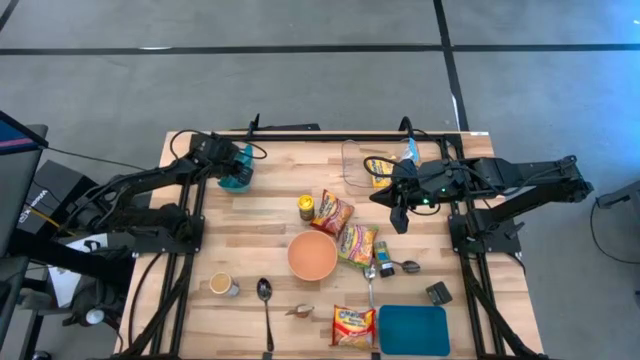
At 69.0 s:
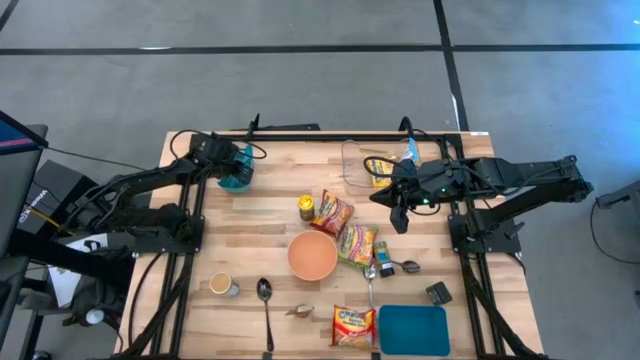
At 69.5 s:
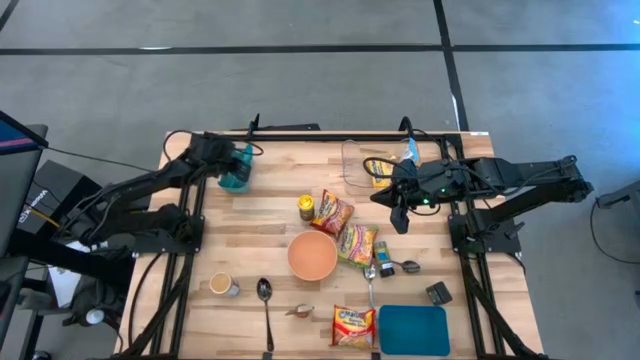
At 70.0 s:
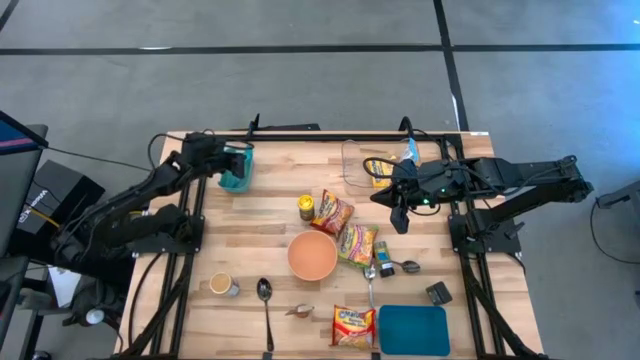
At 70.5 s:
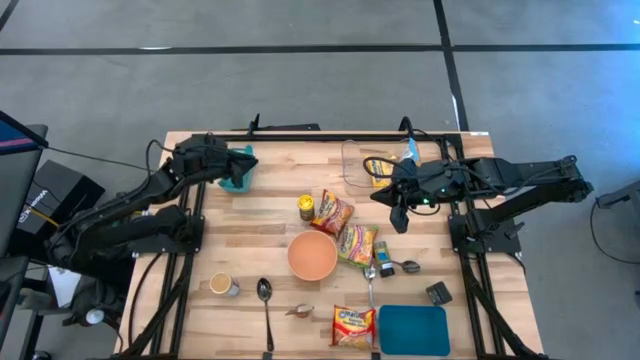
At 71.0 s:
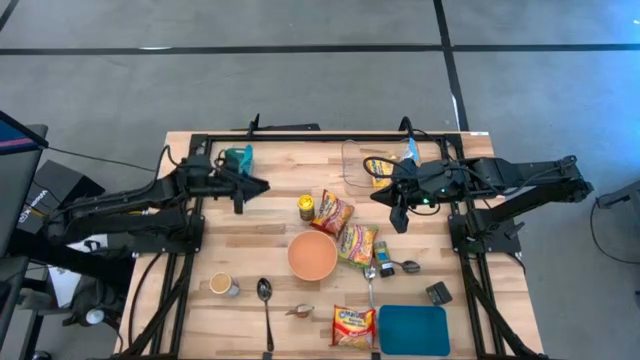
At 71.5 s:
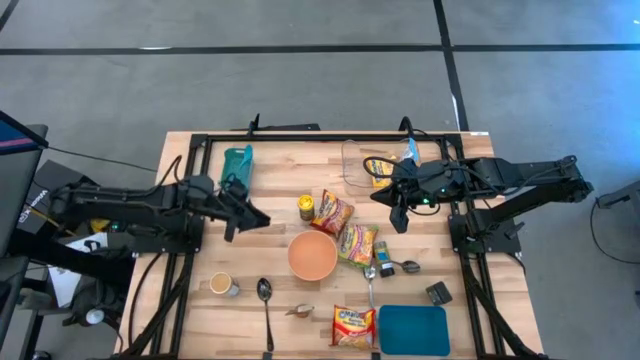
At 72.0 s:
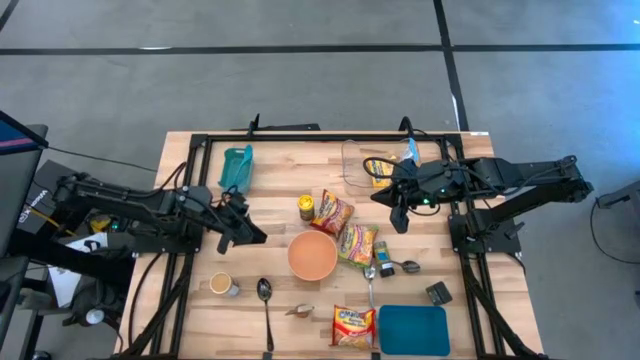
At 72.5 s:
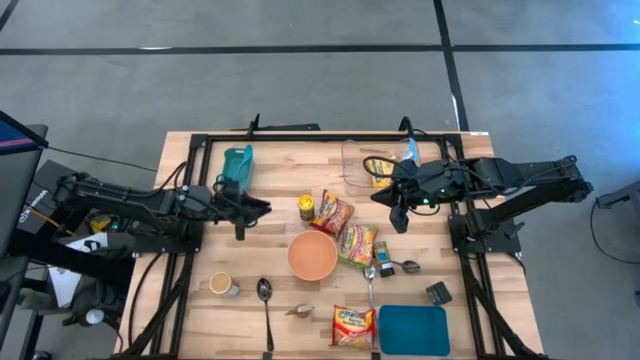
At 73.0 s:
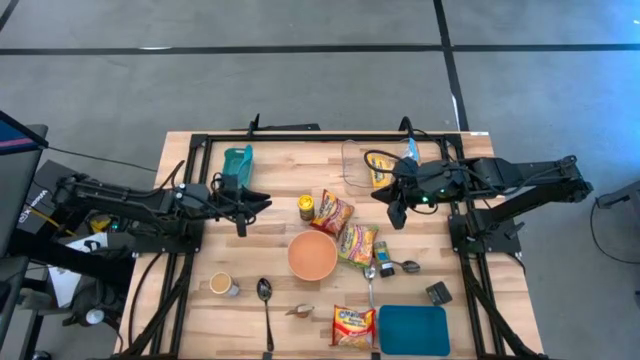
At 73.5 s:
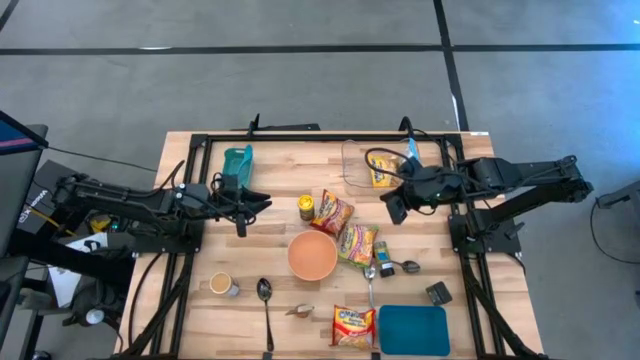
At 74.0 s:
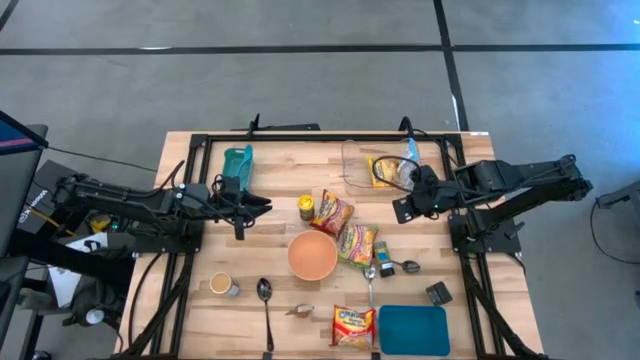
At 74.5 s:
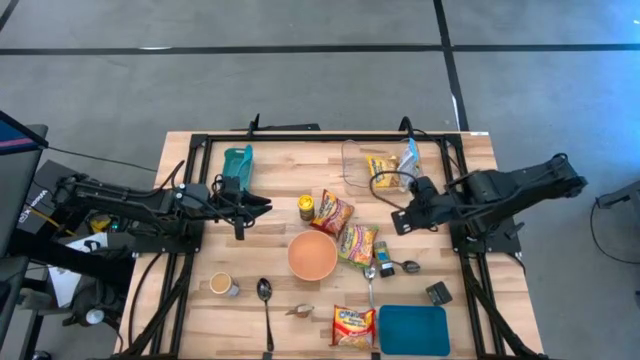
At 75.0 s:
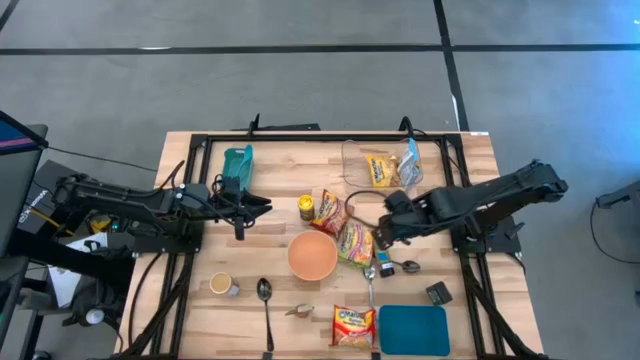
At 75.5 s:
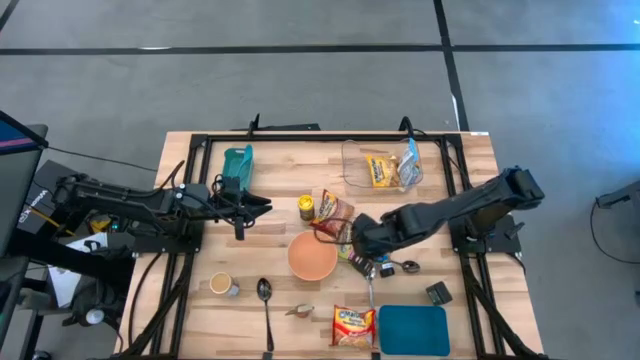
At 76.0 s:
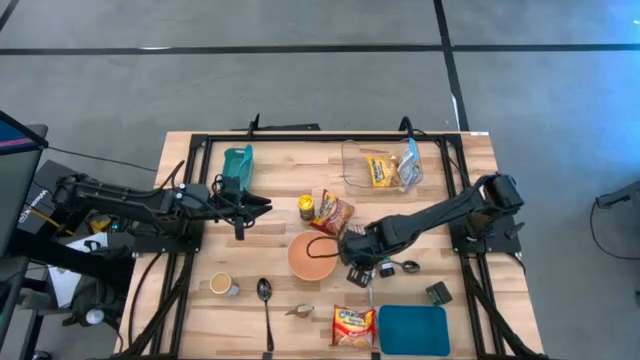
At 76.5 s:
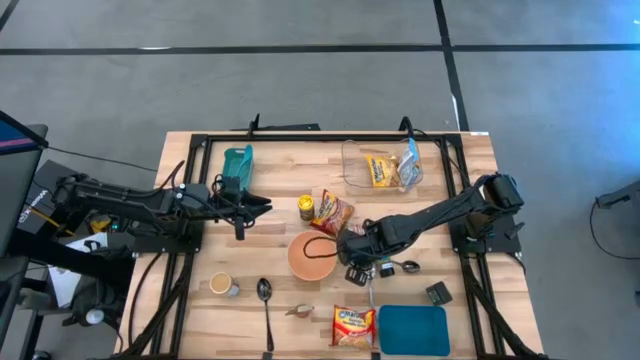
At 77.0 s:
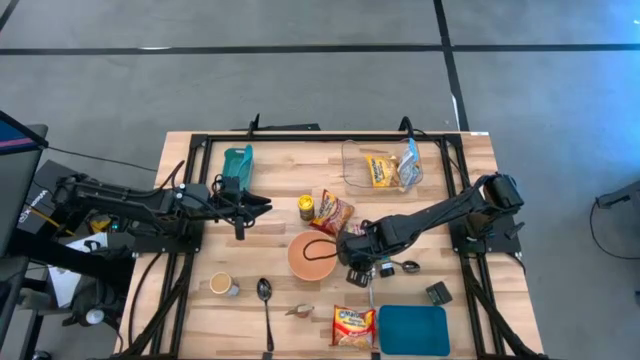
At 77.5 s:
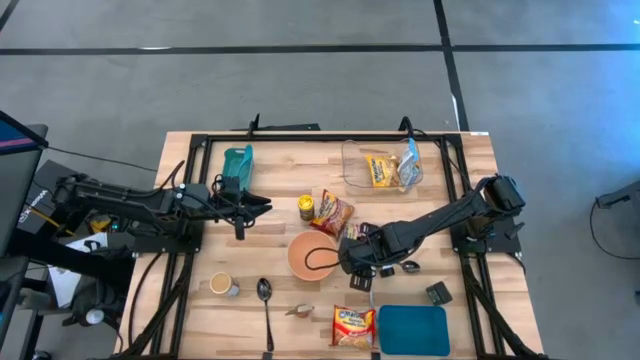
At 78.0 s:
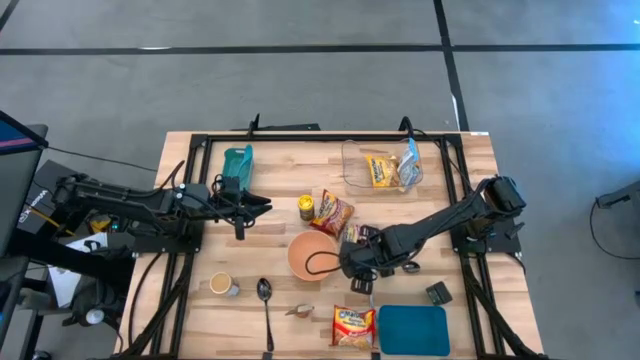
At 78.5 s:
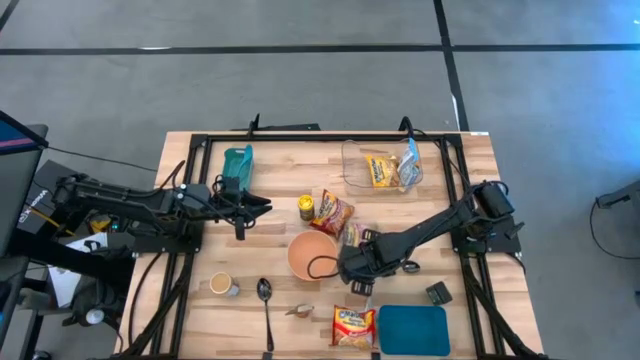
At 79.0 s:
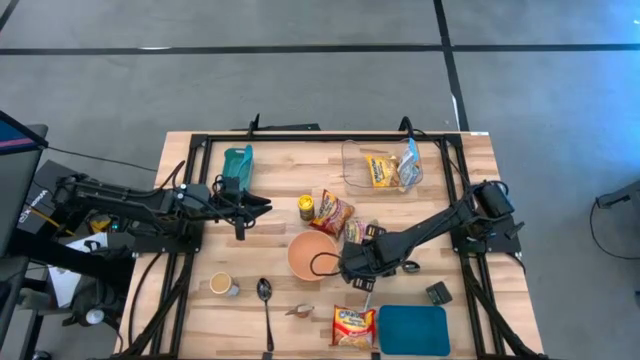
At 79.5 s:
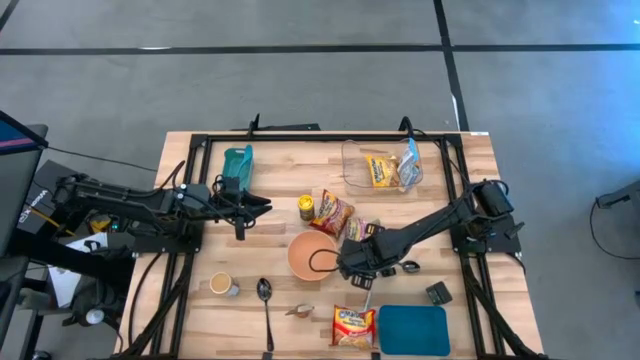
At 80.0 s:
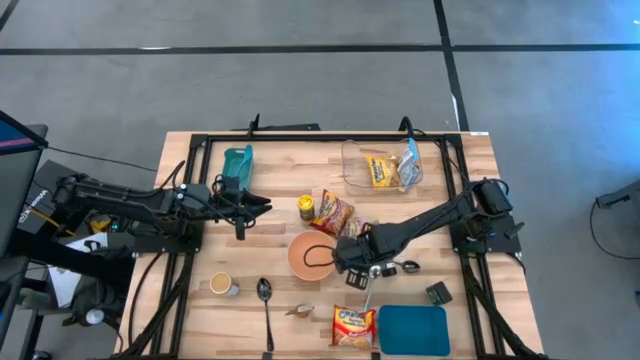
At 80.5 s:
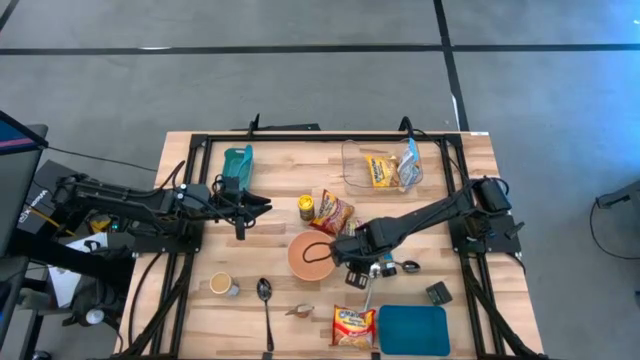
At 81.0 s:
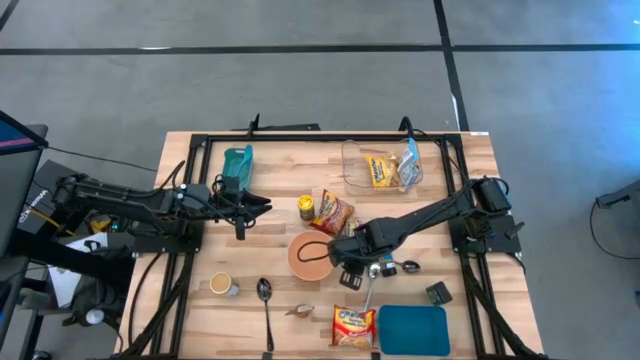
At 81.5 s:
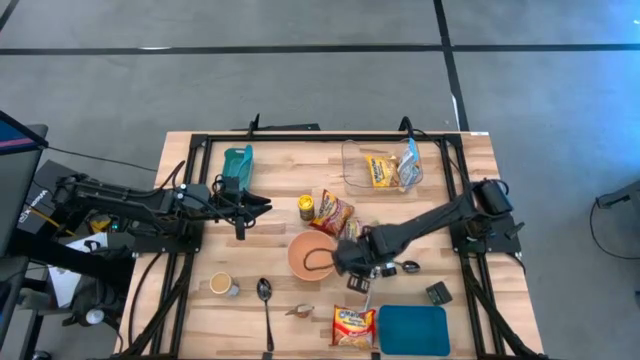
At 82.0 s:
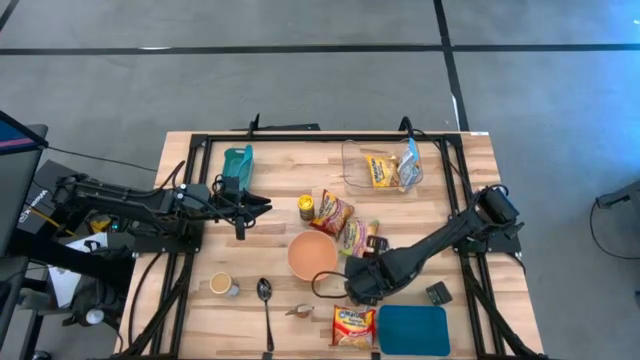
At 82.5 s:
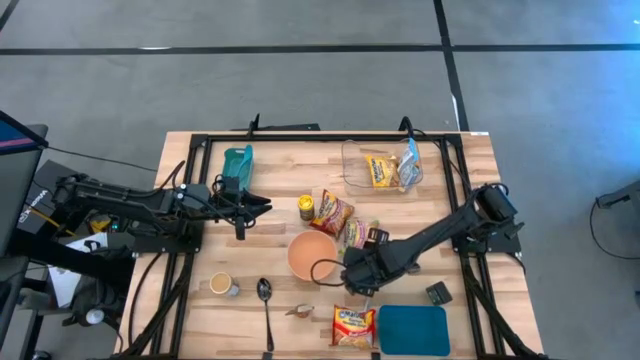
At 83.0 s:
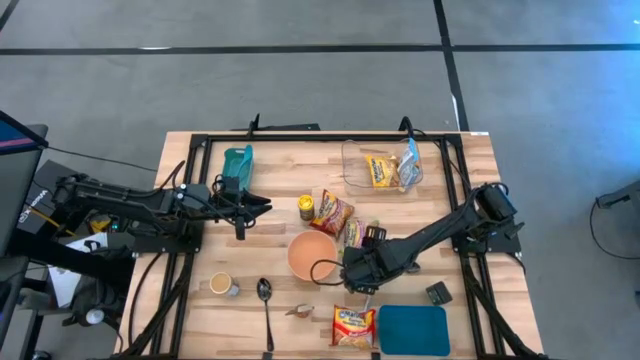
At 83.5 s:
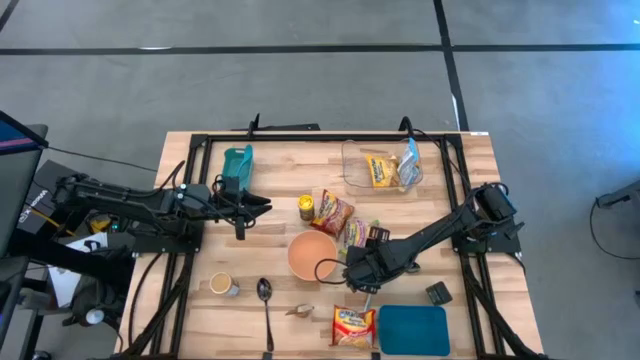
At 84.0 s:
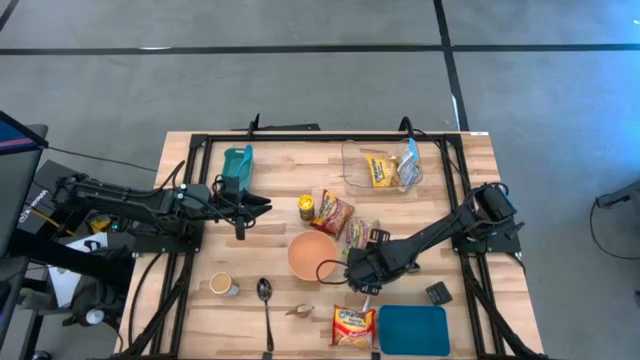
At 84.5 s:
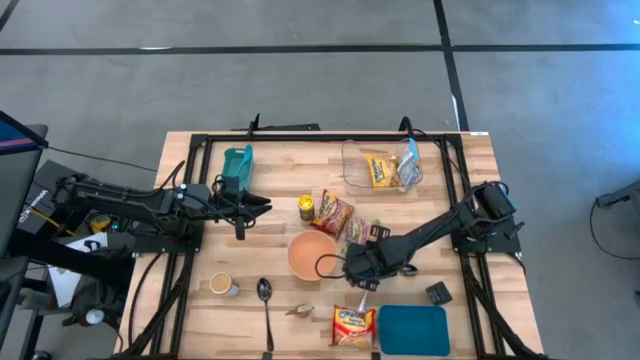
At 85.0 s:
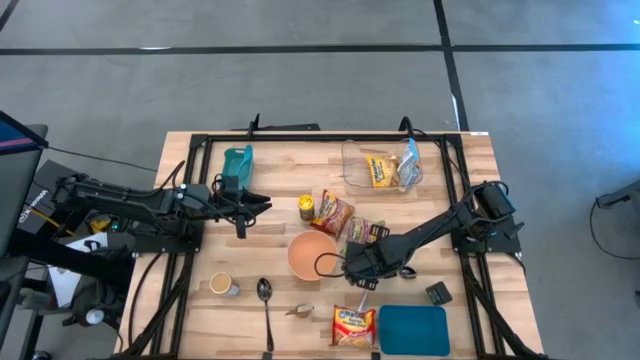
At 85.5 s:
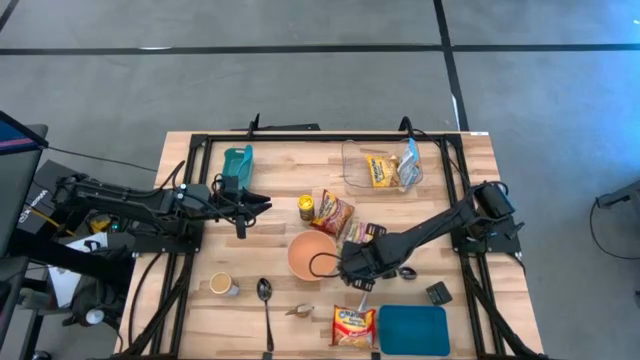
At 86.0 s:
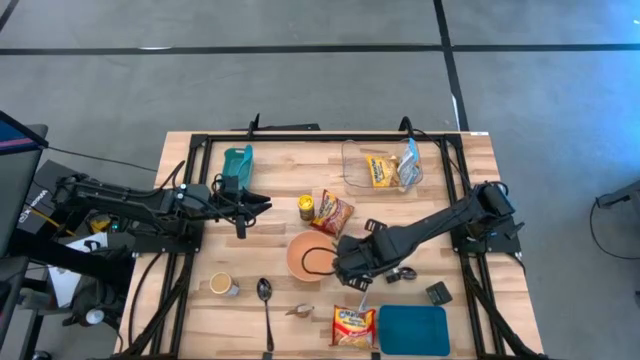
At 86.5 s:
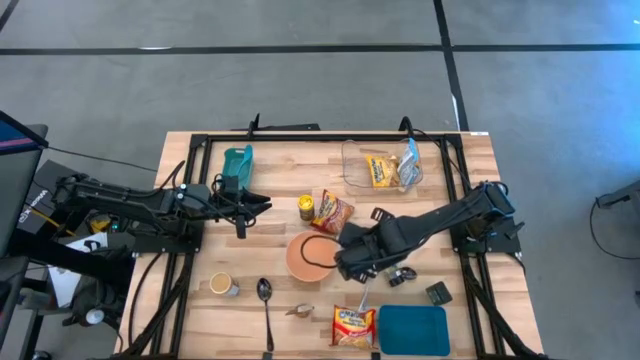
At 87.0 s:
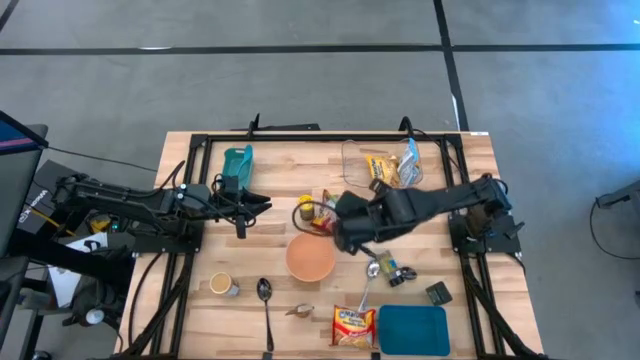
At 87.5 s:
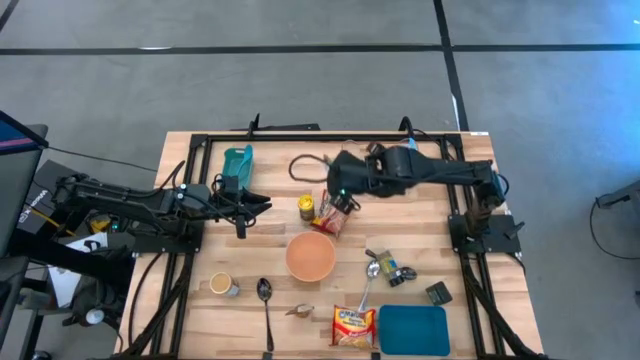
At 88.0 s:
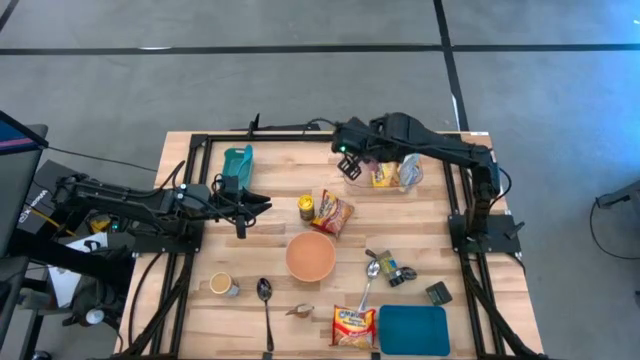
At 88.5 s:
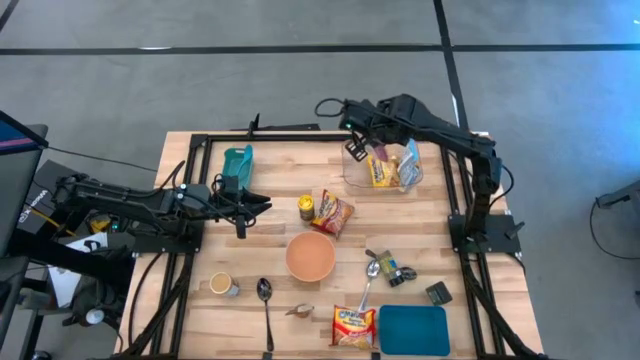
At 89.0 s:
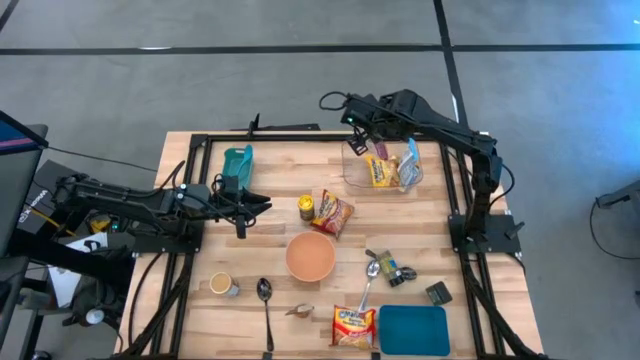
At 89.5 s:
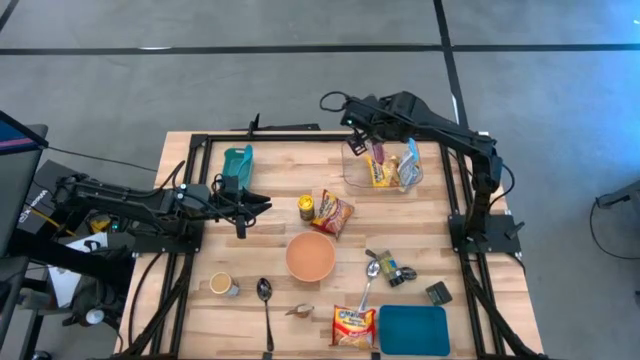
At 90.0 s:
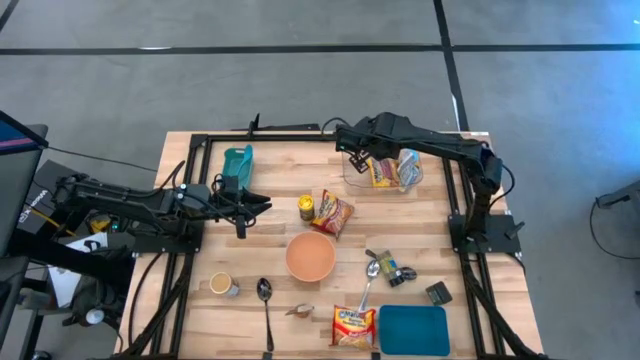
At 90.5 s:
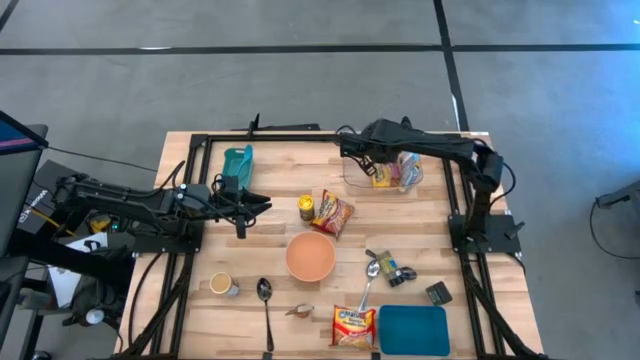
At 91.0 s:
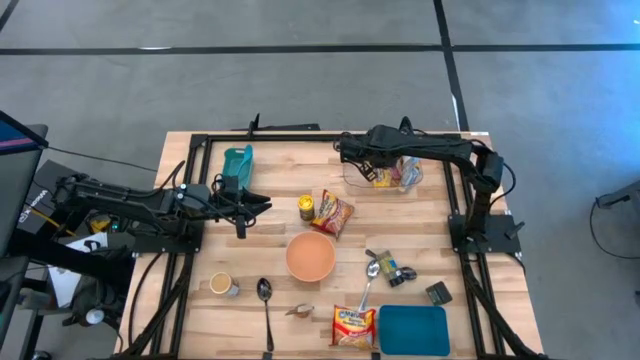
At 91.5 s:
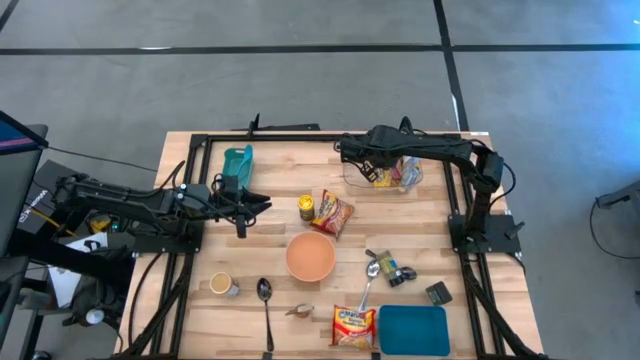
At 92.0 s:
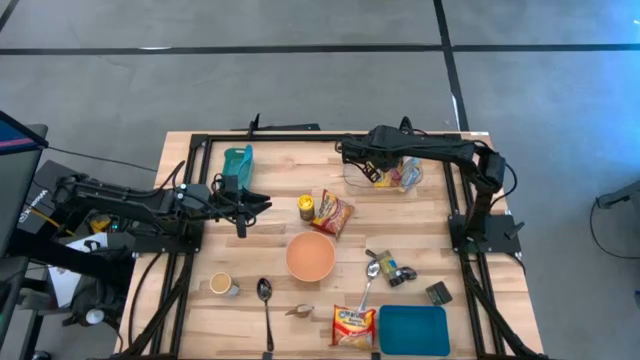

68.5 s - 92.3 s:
Task: Pick & Place Food Item
Put the green noodle pack into the transparent organizer
